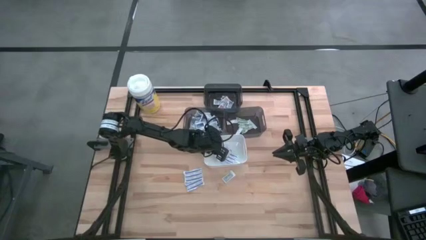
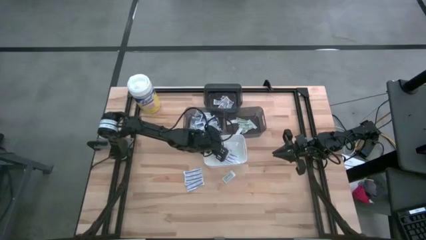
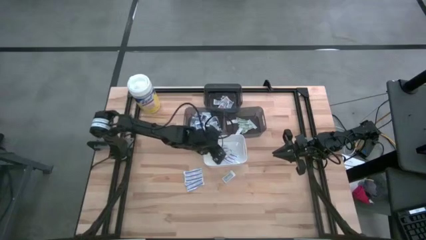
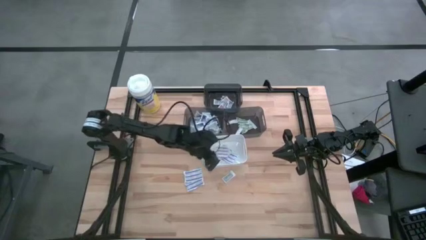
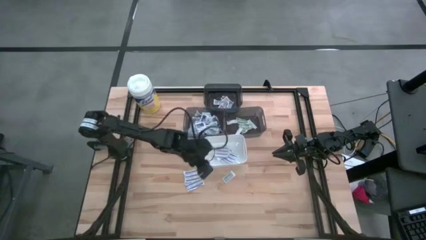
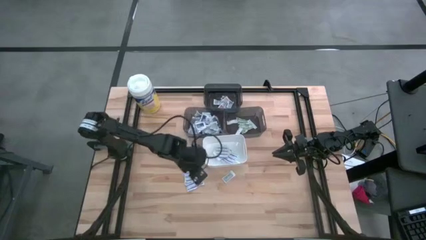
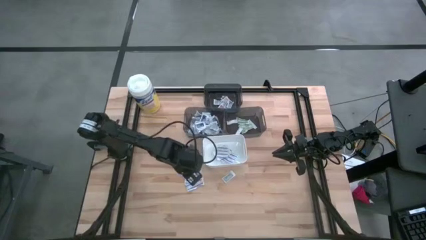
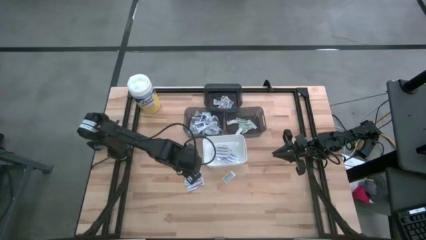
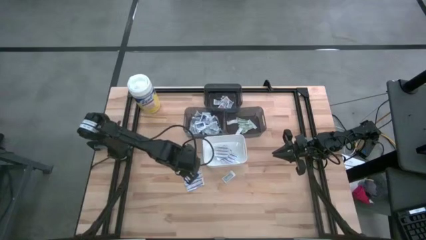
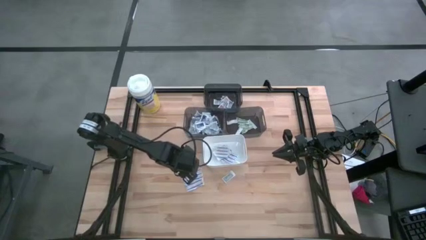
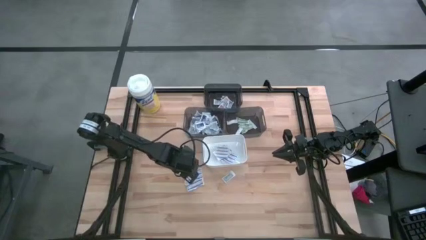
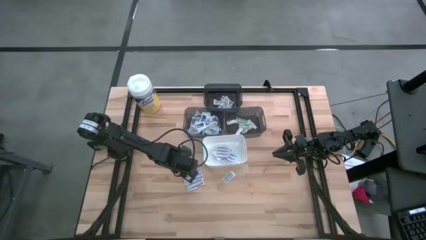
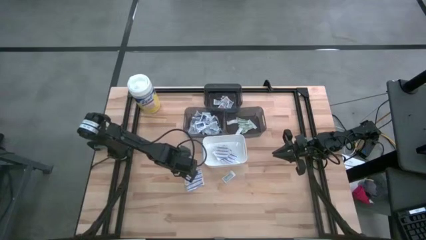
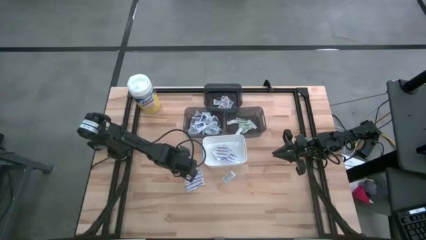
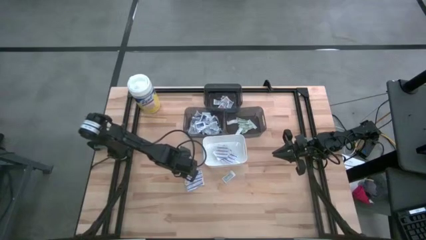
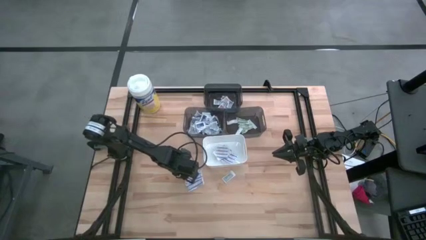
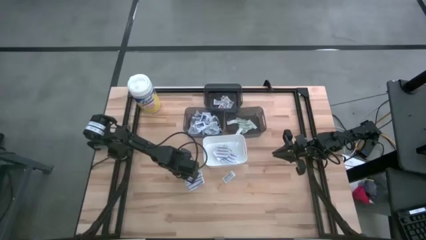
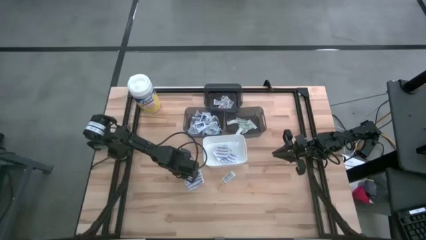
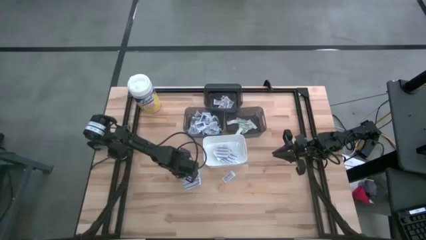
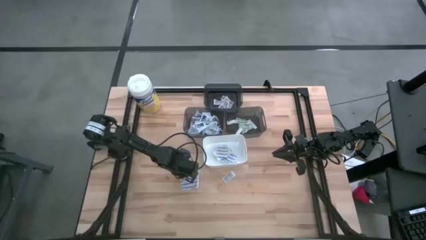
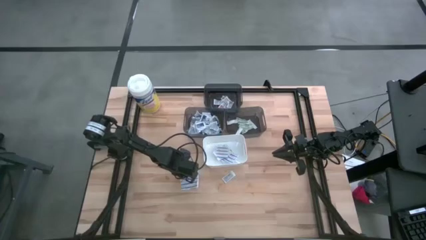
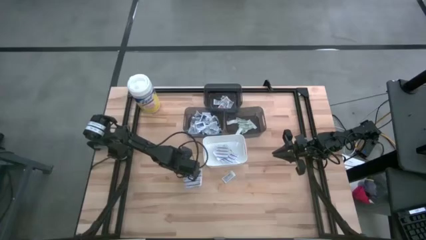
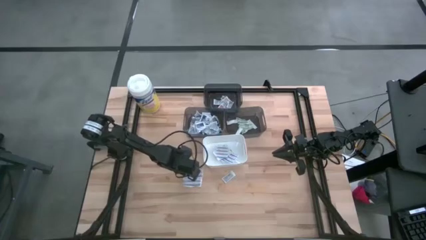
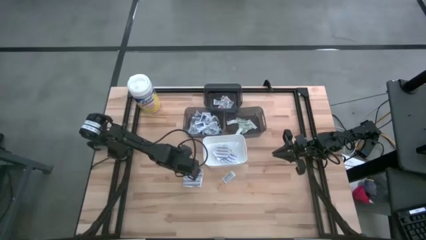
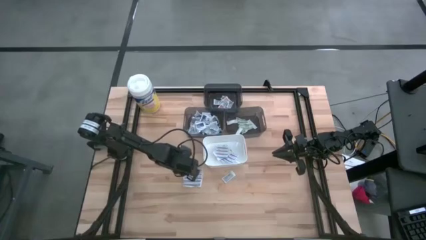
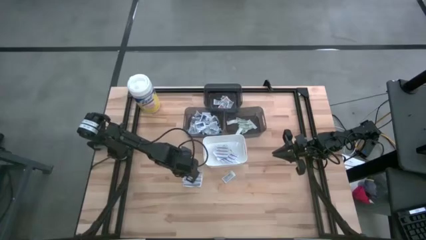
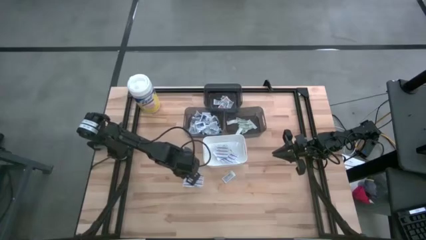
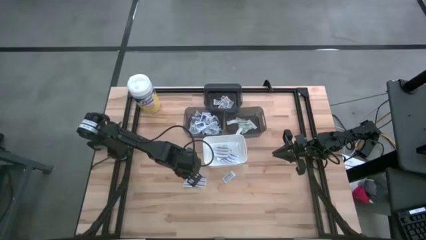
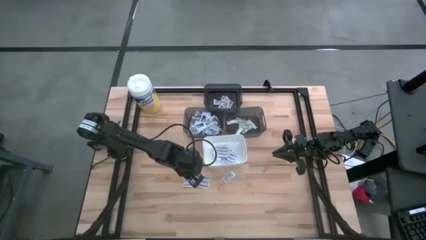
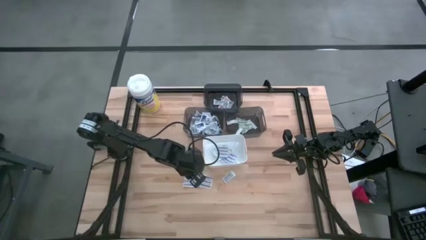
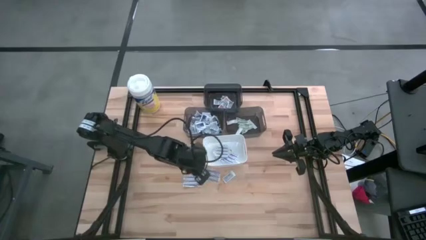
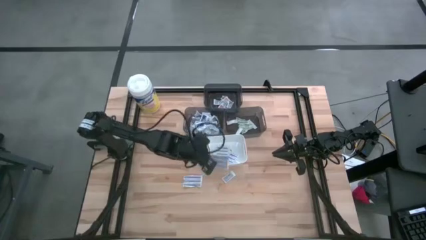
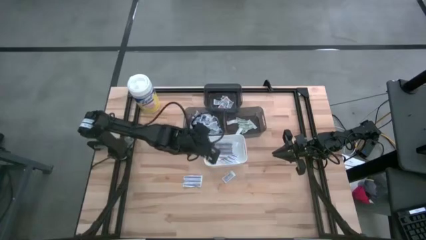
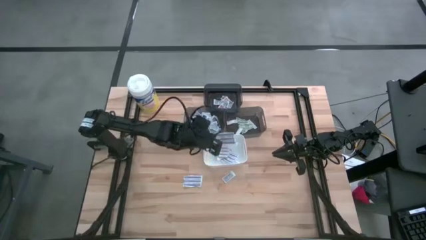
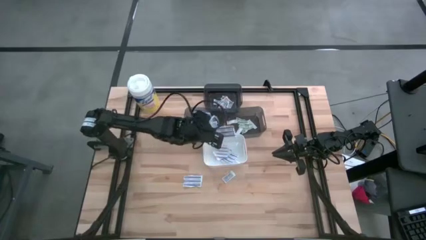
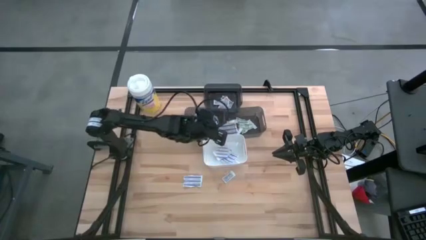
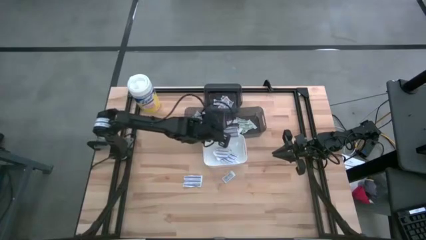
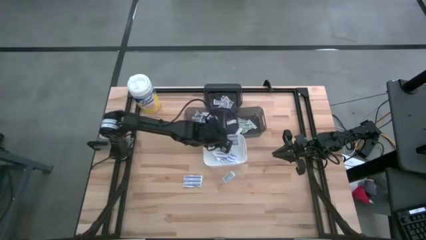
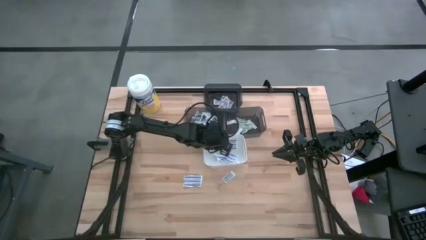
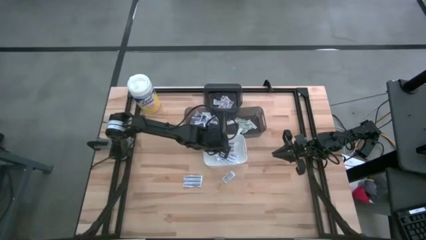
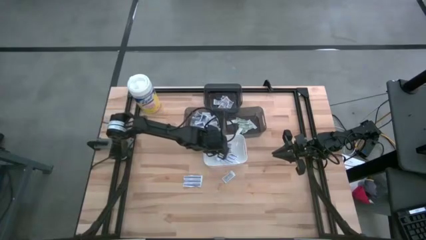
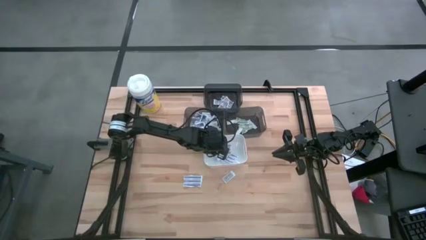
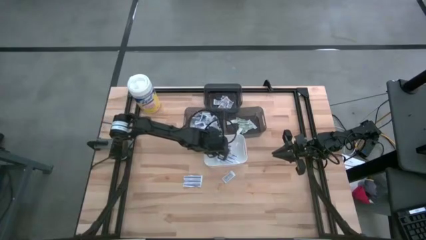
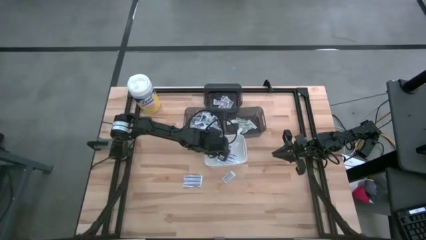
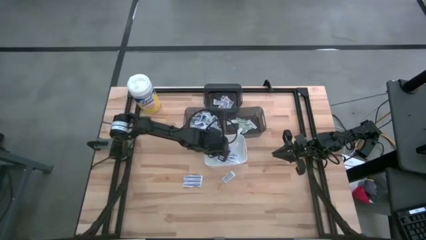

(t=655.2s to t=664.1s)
Task: Pick & Place First Aid Supplies
Put the blue bandage into the white bin

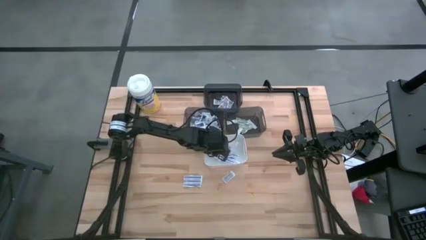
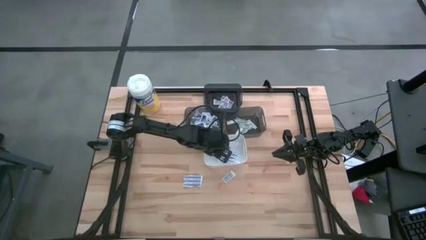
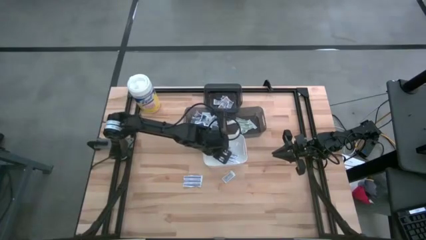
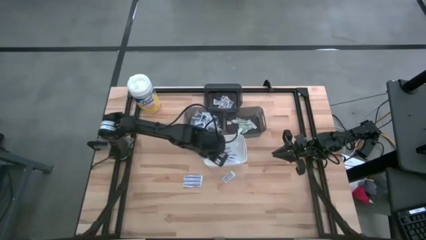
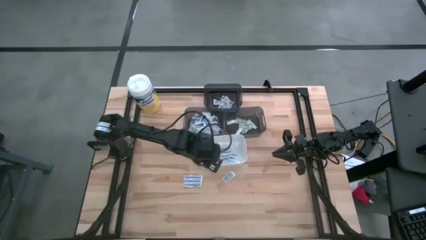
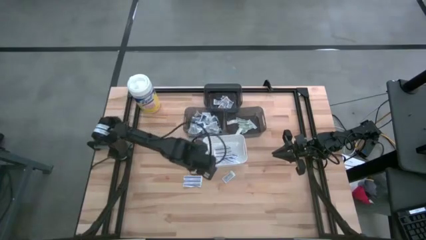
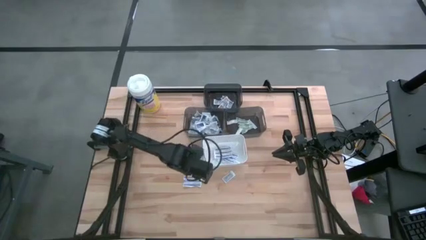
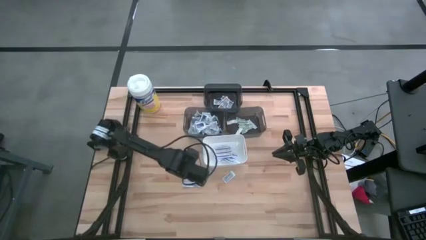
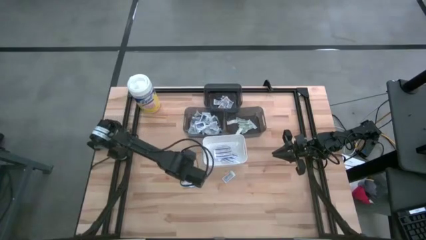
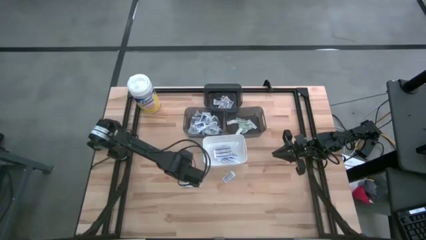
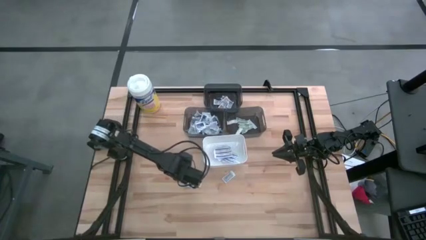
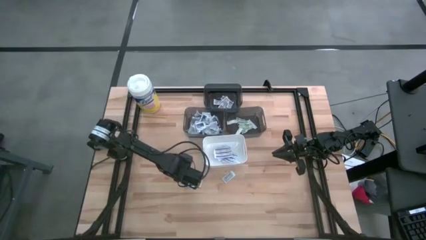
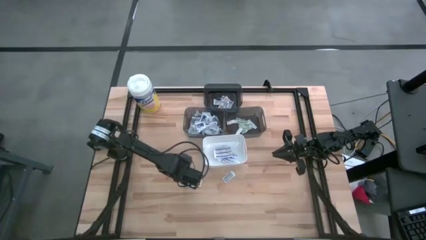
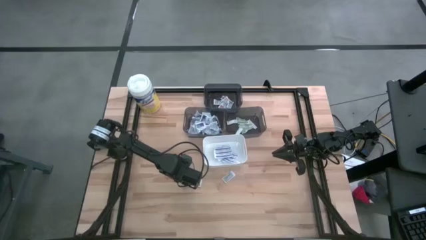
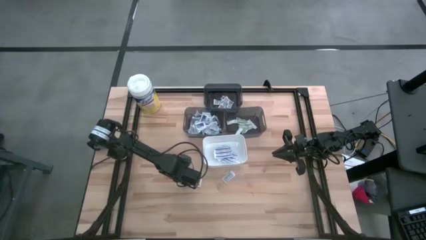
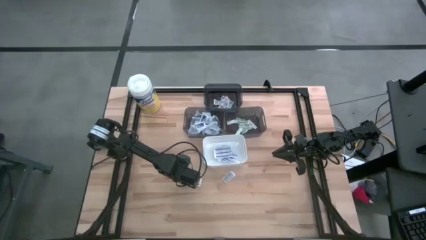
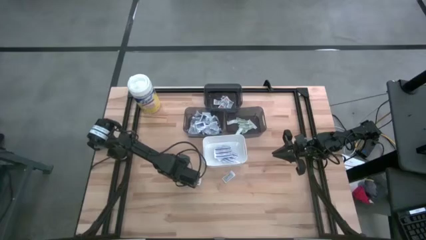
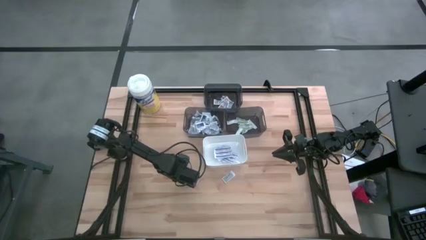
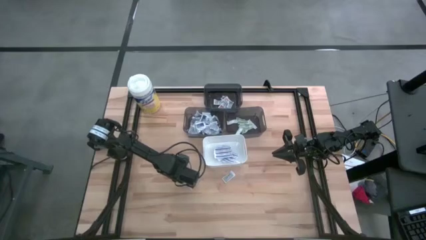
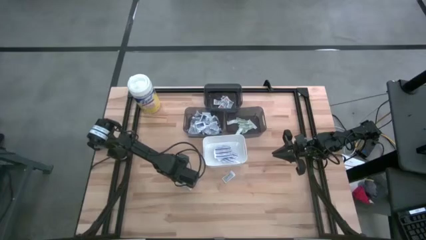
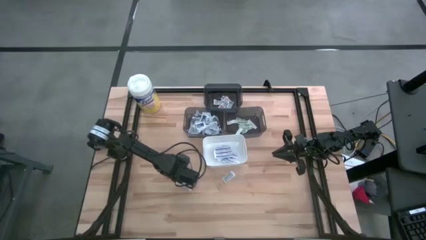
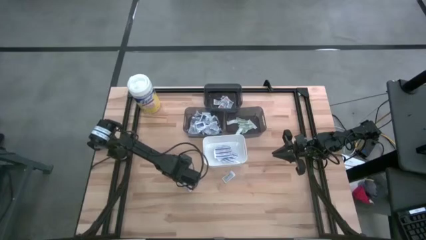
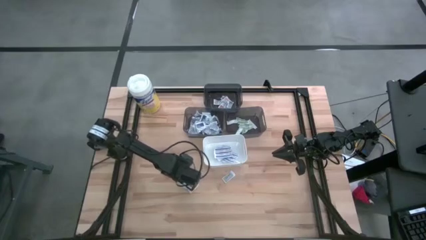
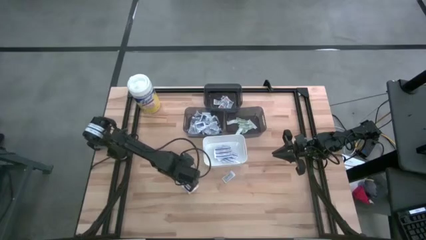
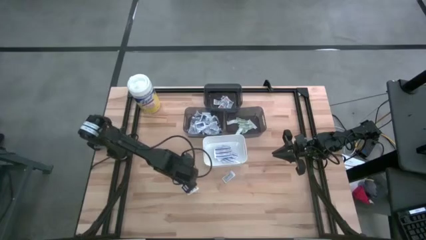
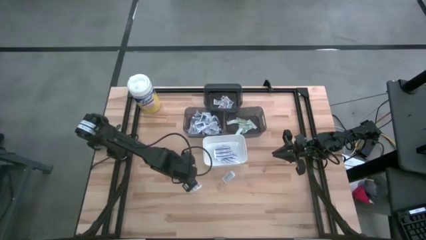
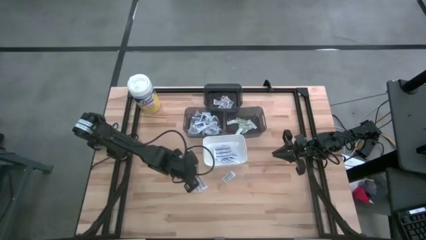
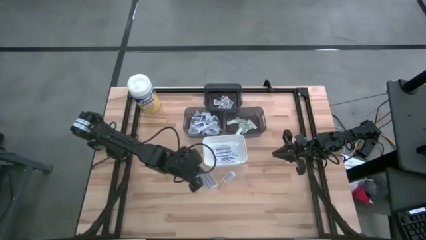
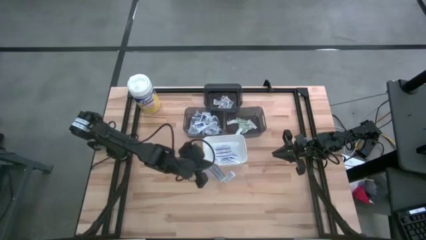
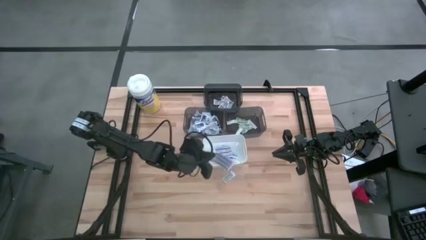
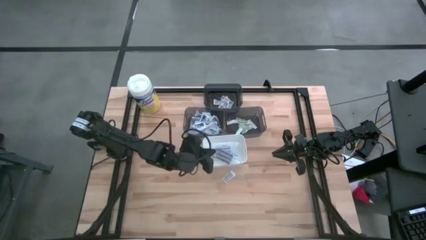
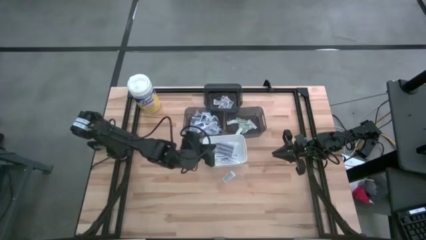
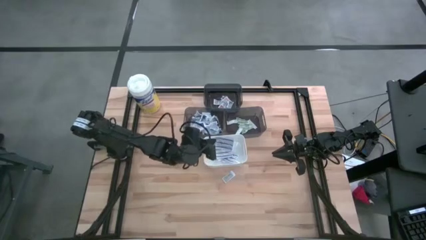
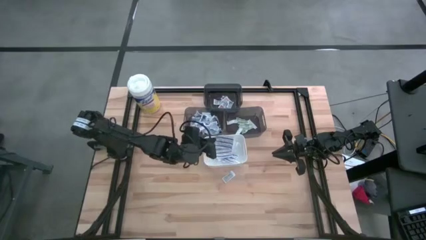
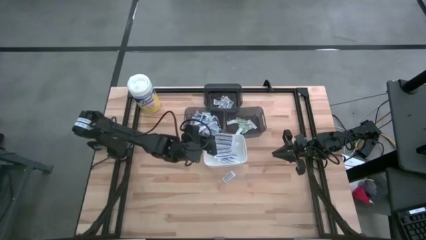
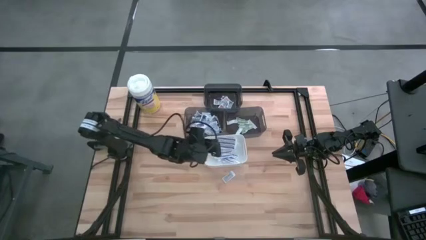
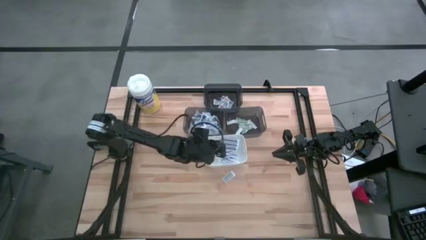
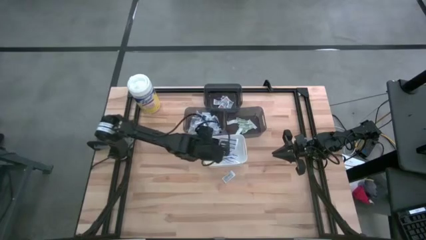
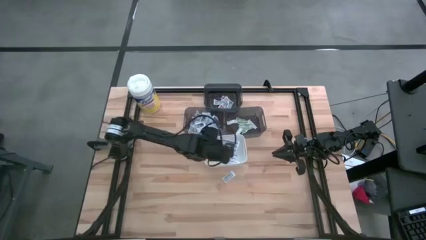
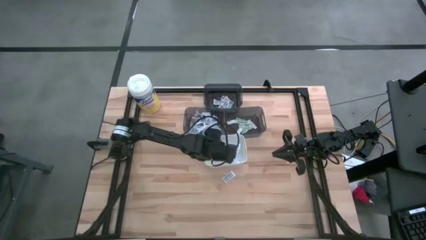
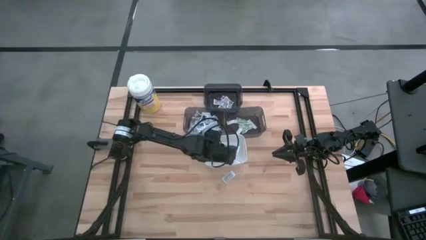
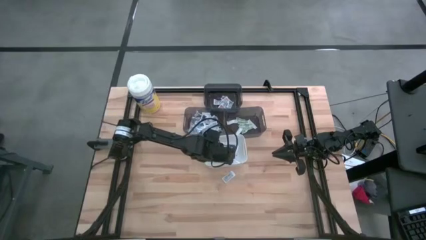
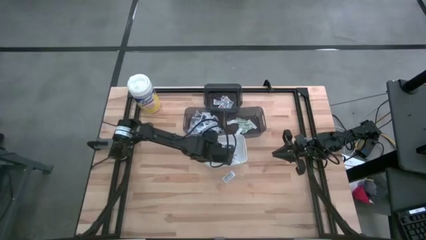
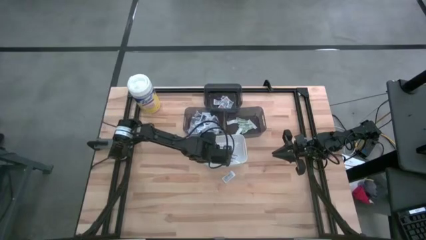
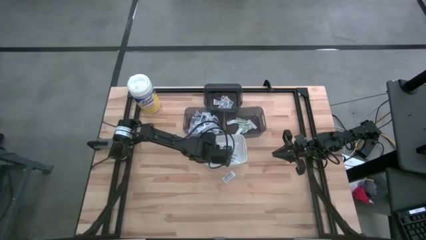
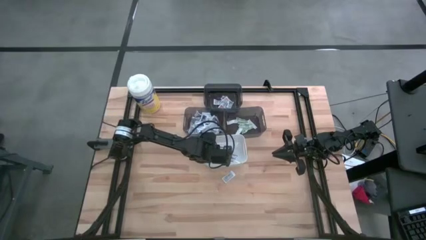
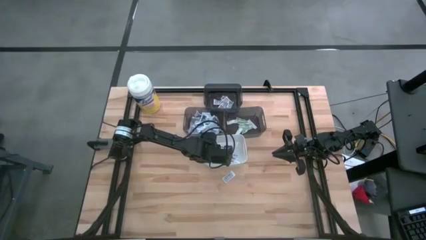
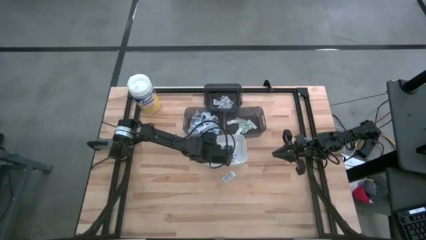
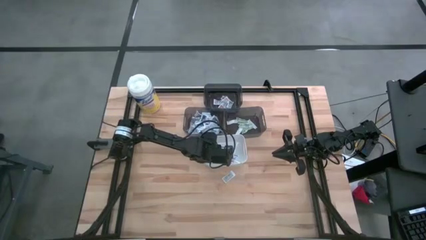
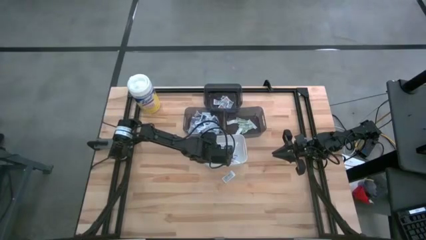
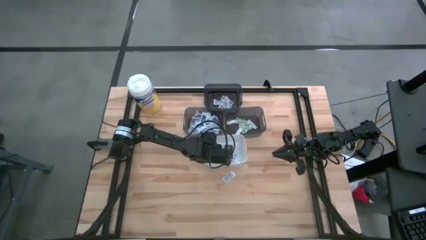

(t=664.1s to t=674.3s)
Put the blue bandage into the white bin
